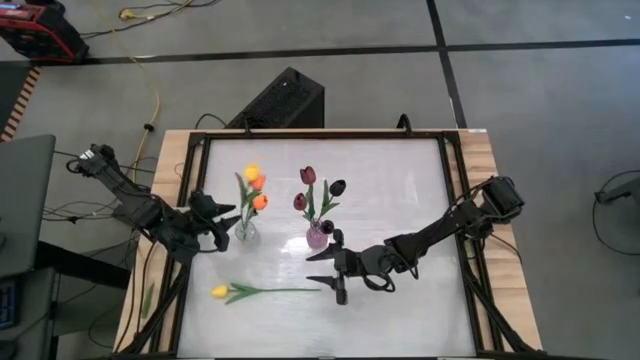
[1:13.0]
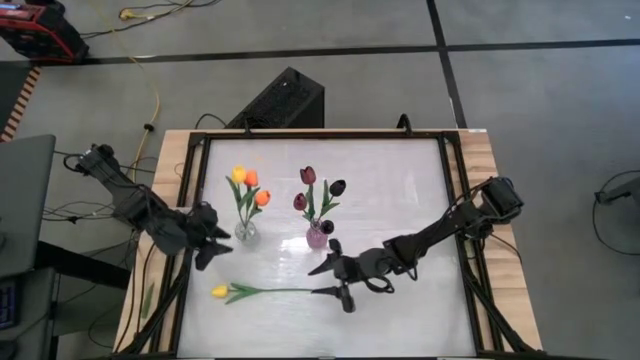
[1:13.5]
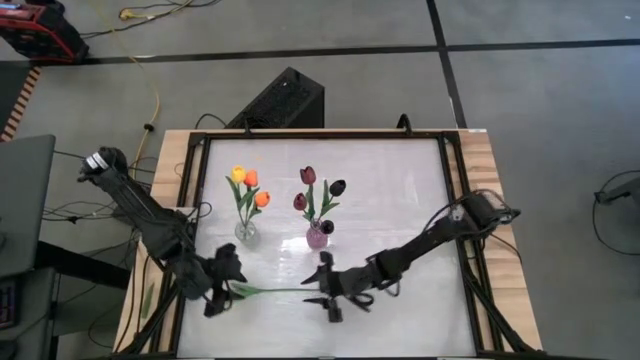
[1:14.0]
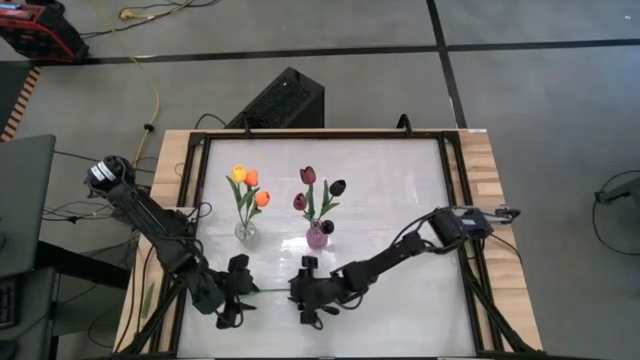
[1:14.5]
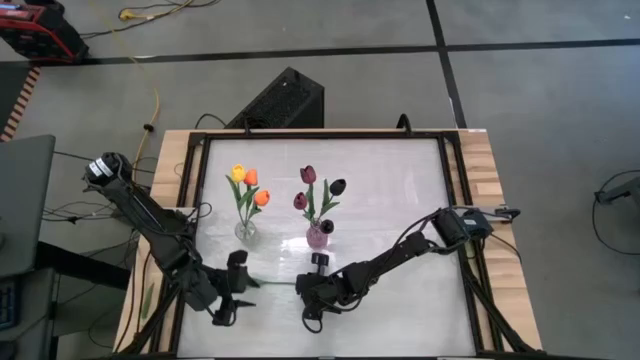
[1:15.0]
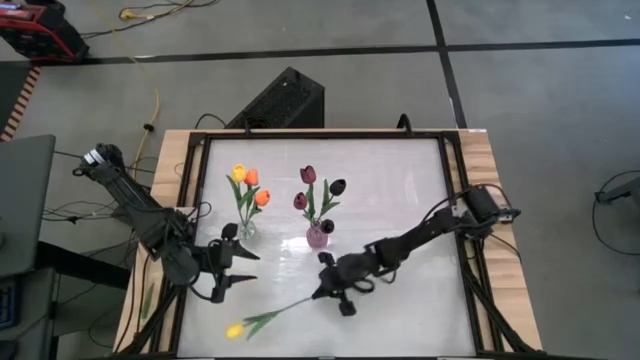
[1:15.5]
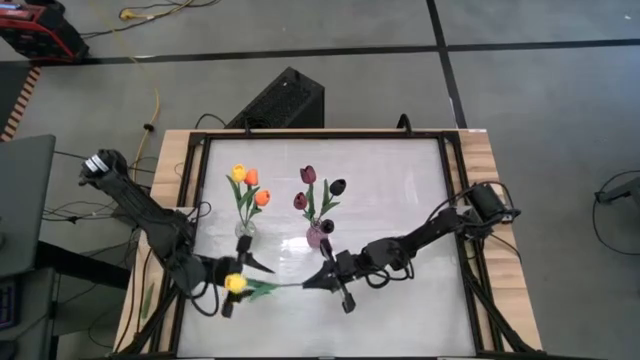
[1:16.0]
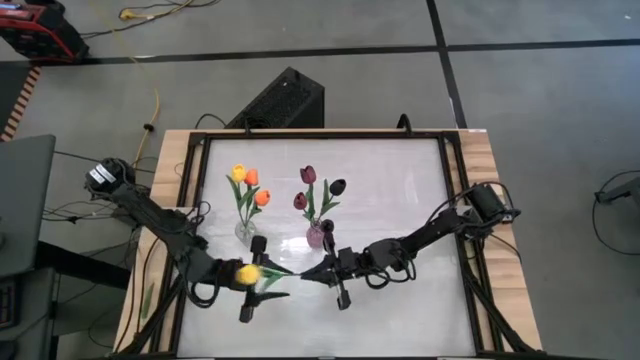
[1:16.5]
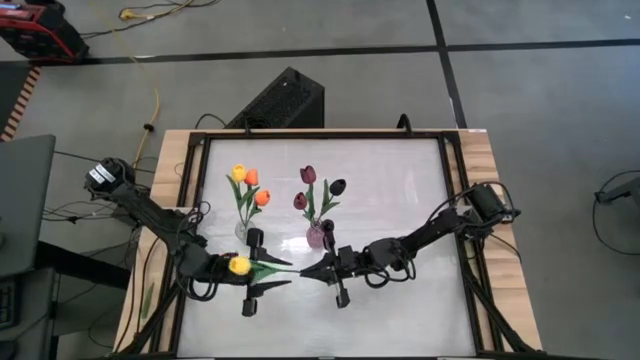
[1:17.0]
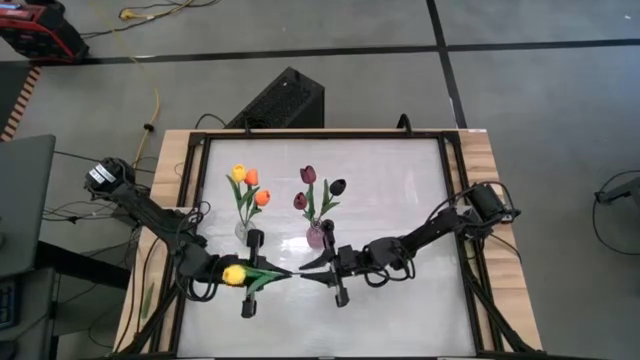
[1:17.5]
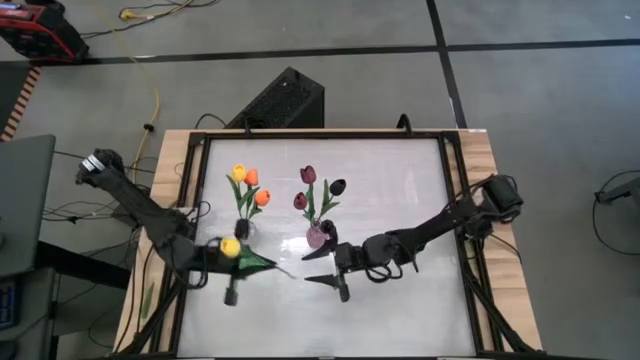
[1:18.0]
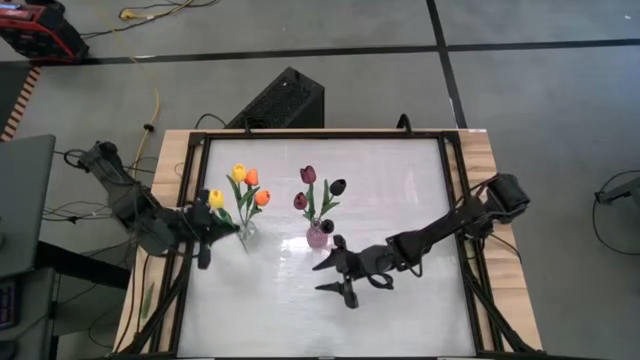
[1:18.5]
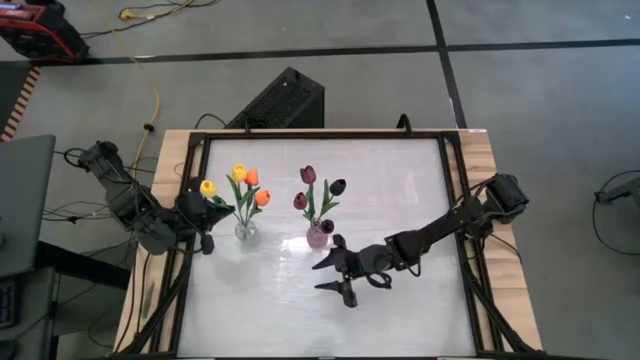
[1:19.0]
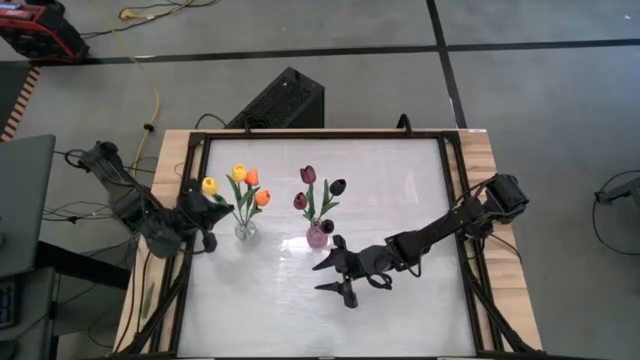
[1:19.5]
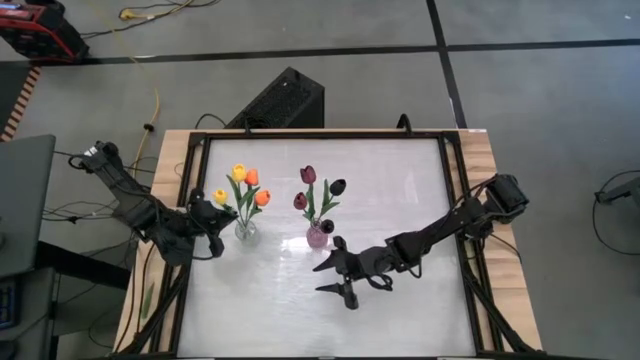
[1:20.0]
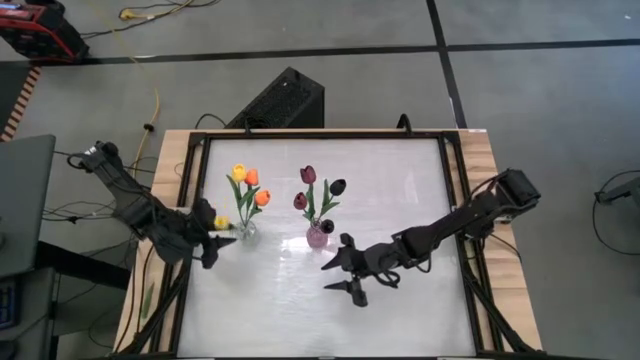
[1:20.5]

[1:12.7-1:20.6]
Task: Sort flowers into vase by color
Put the yellow flower into the transparent vase

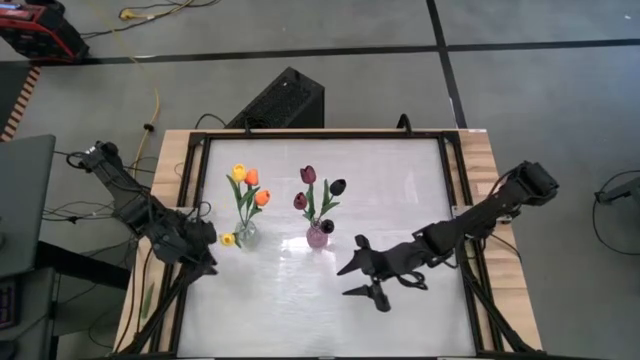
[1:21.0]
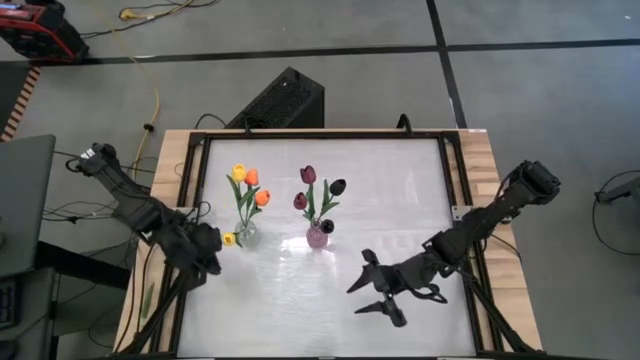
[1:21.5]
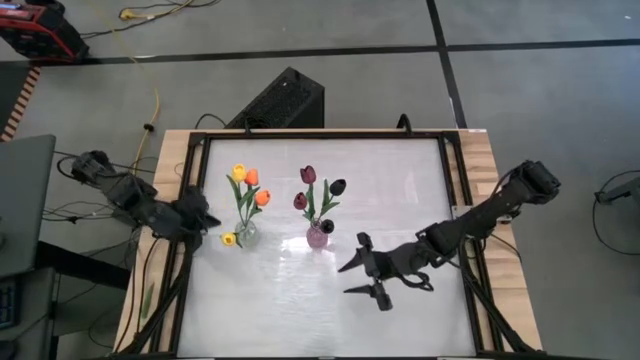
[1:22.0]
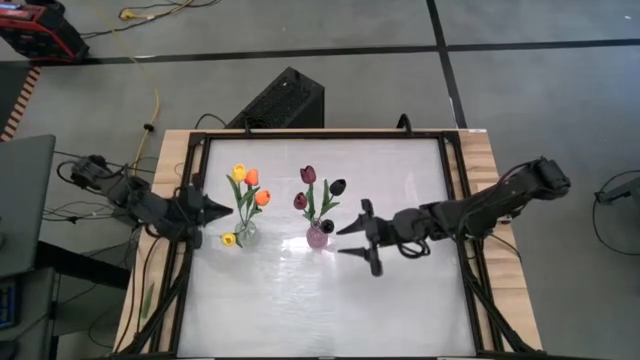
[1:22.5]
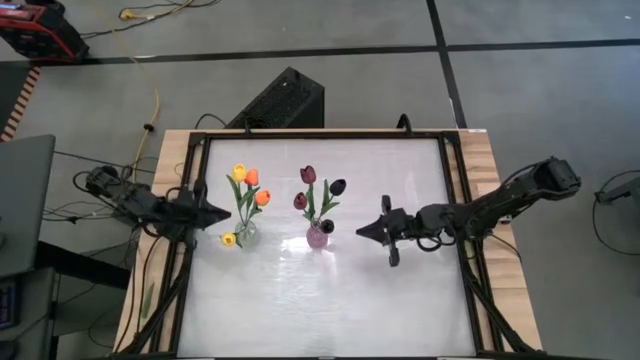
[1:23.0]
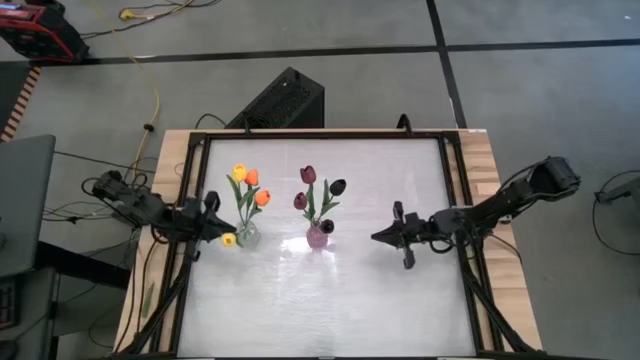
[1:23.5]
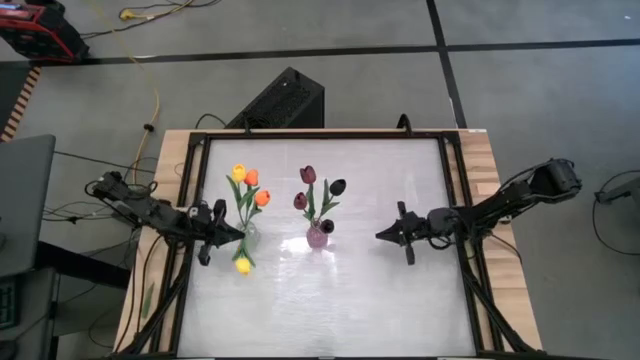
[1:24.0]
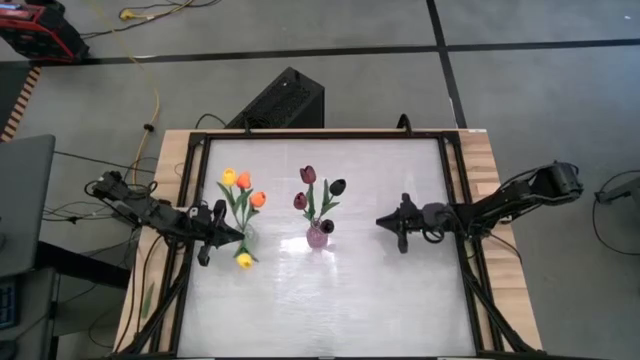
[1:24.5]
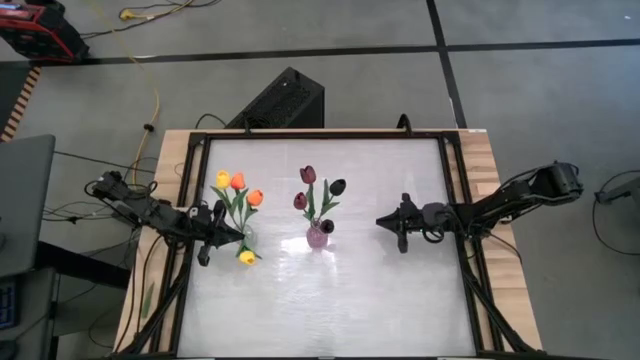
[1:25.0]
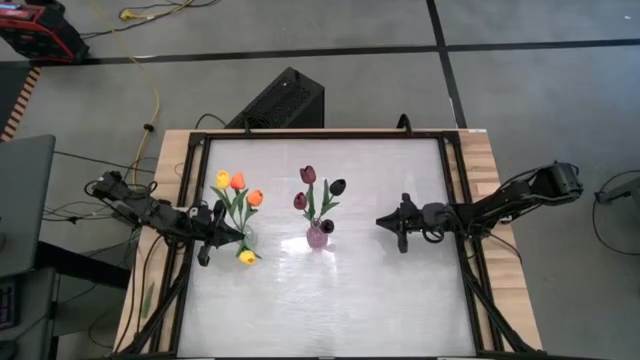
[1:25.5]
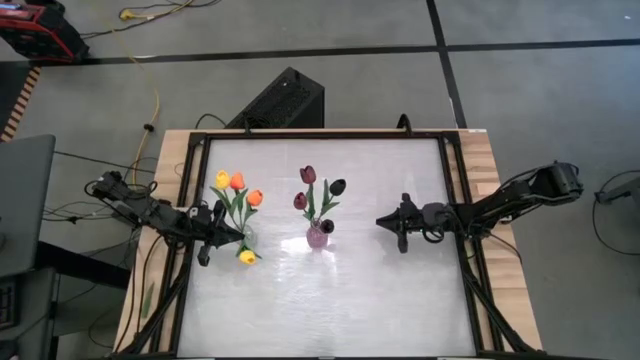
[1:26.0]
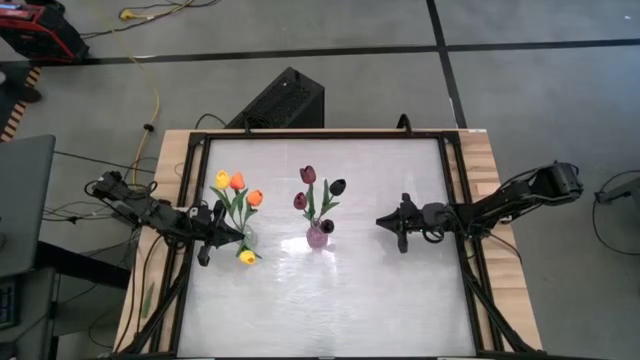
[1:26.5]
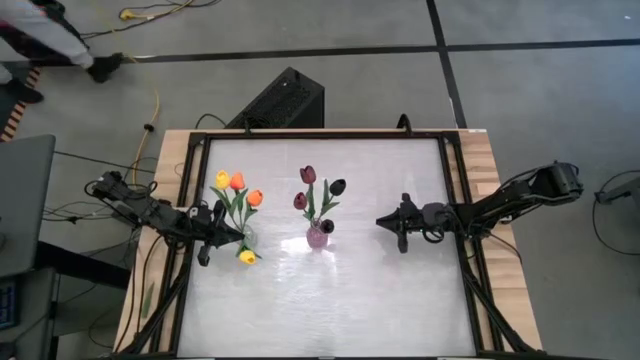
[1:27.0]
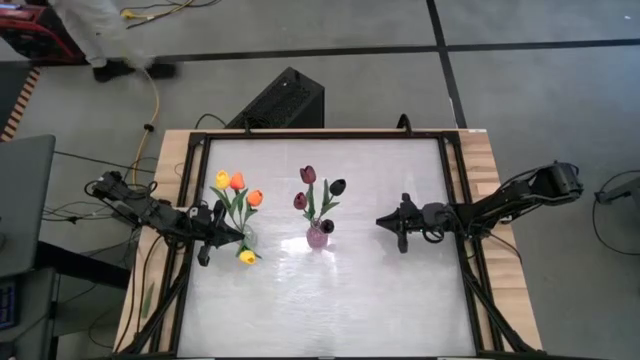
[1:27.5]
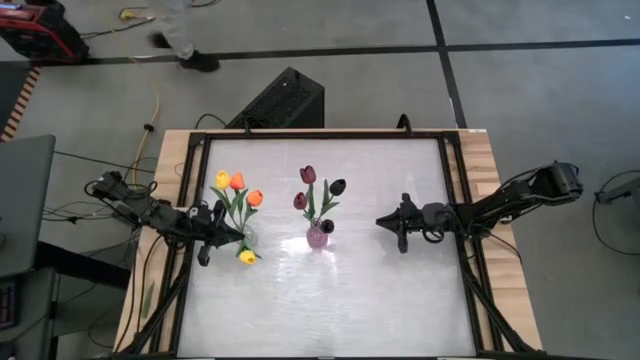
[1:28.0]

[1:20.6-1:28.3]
Return to Home Position

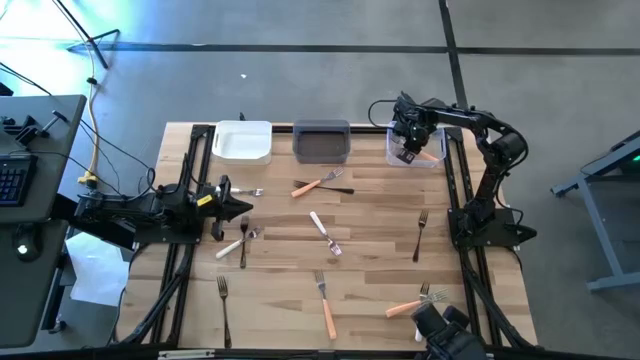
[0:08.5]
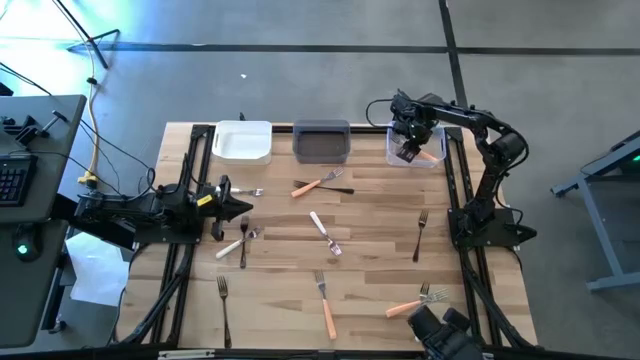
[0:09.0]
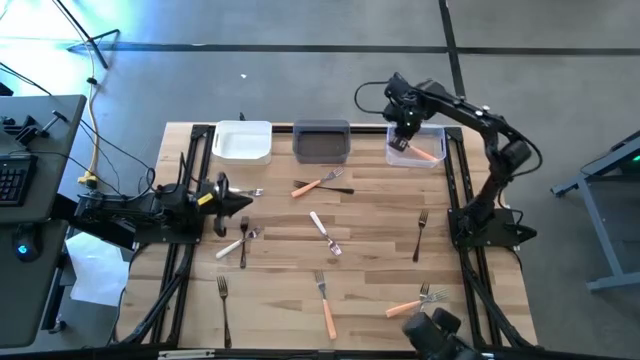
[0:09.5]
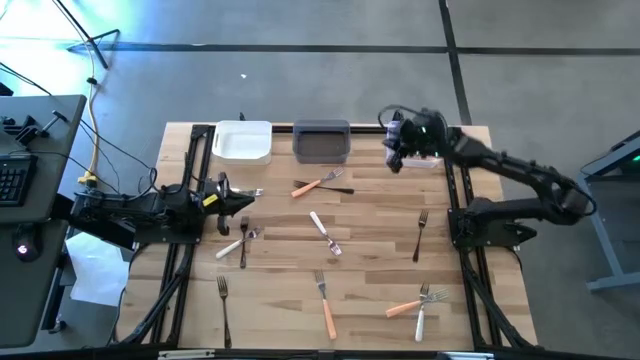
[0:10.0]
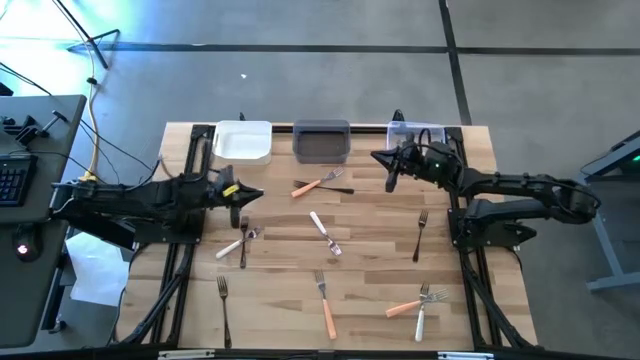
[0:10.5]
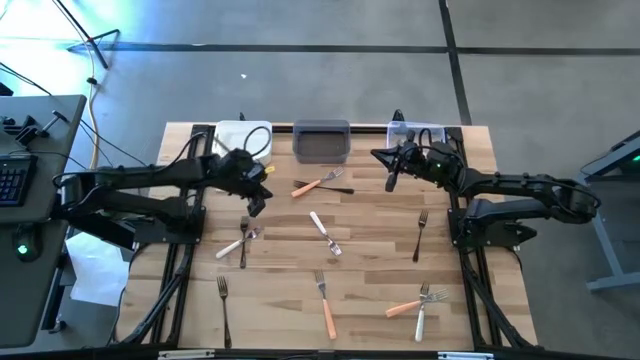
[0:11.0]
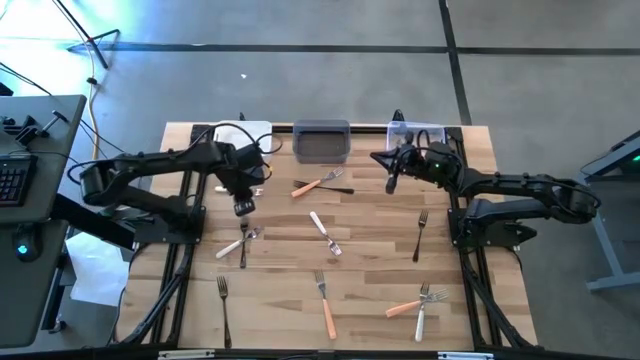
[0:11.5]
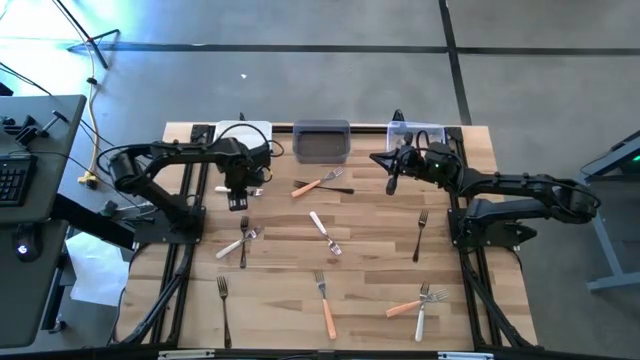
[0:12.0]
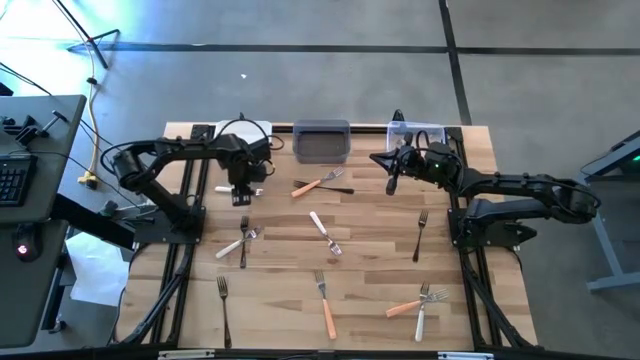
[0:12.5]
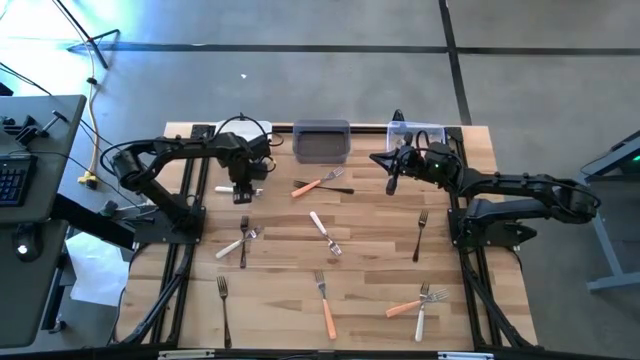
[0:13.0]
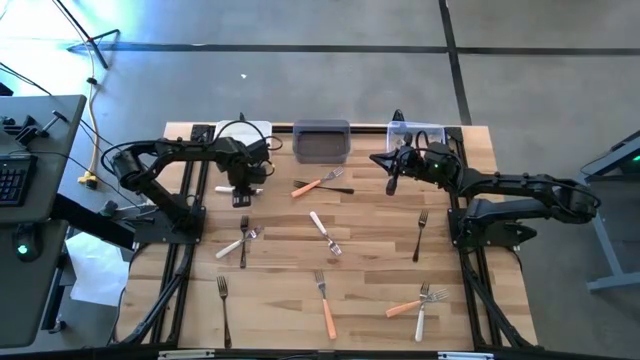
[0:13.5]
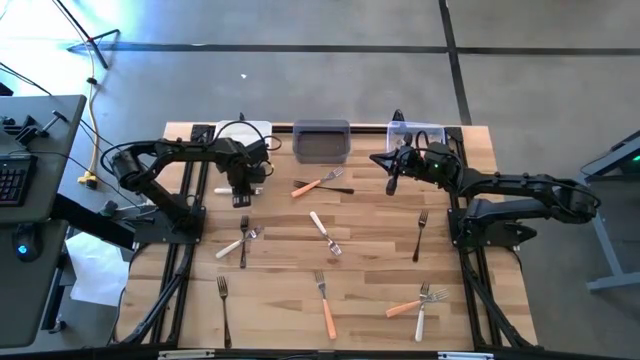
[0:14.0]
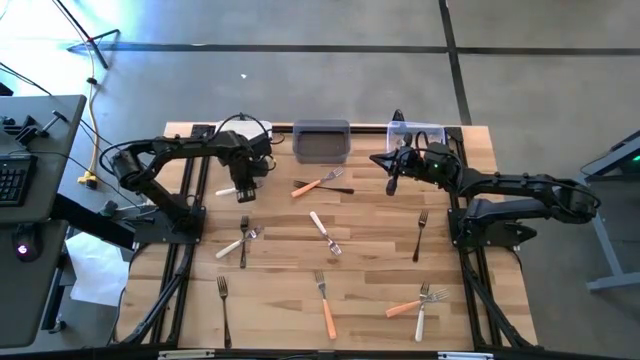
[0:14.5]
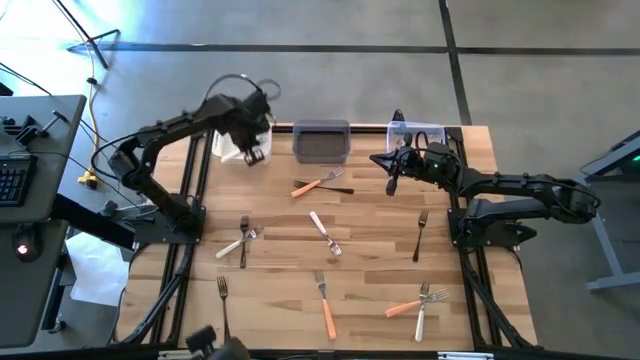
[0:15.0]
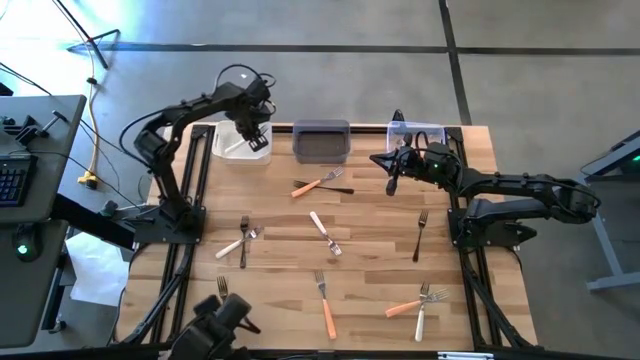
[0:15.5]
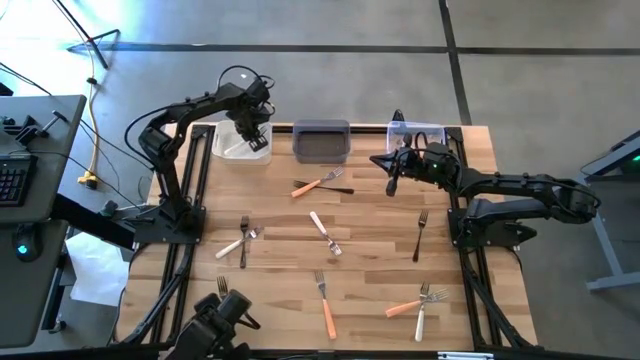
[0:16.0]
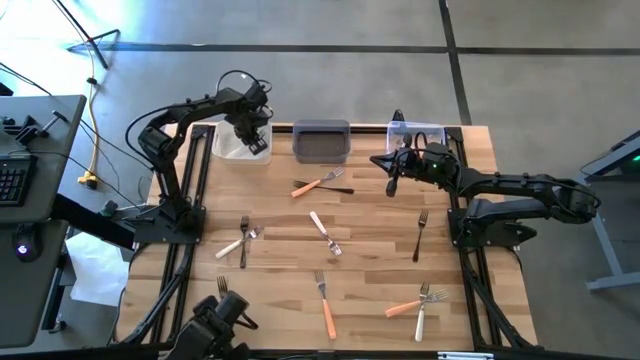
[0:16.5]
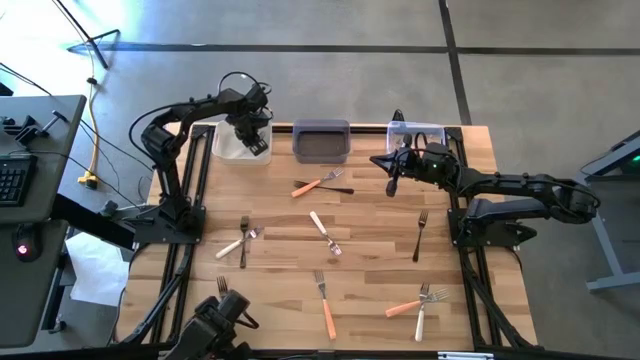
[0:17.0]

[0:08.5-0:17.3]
Task: Sort silverware by color (type)
Put the white fork into the white bin
